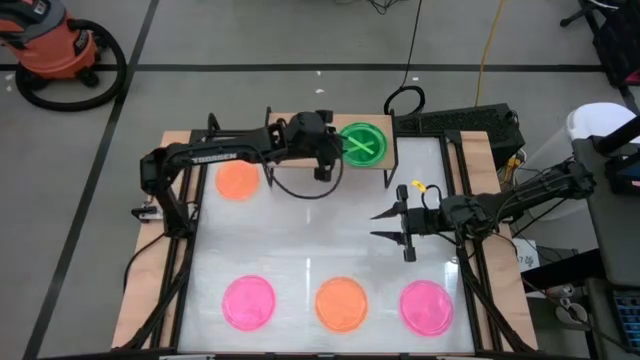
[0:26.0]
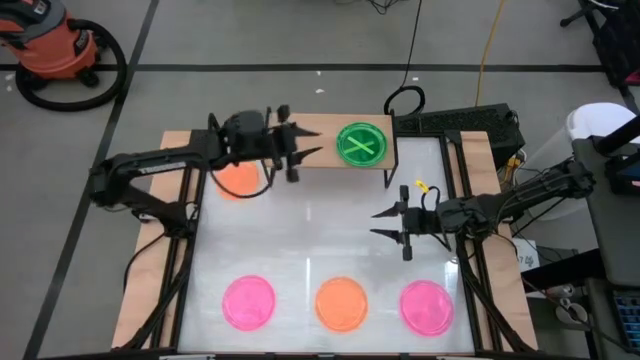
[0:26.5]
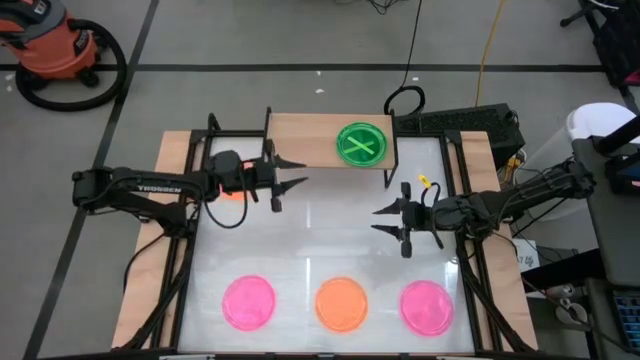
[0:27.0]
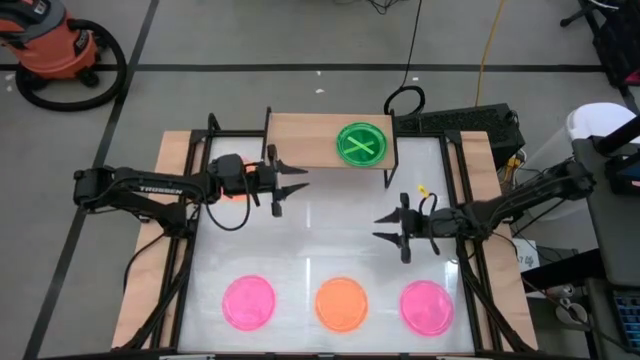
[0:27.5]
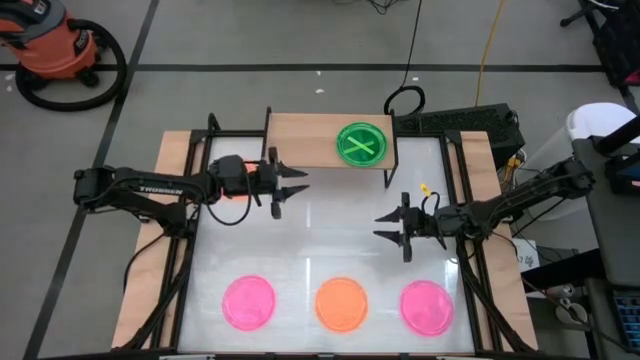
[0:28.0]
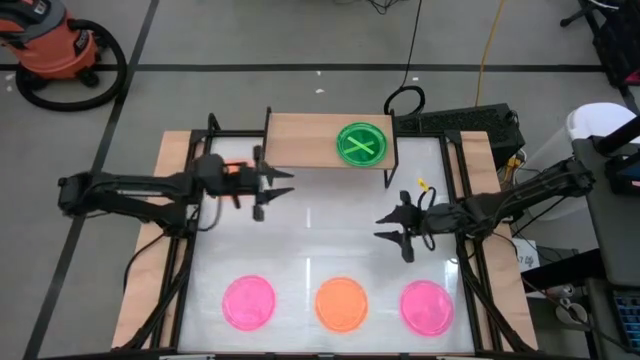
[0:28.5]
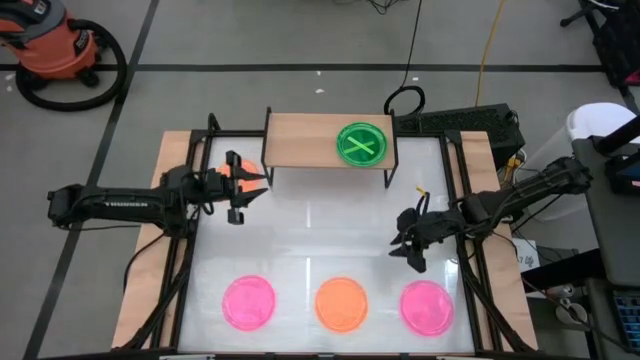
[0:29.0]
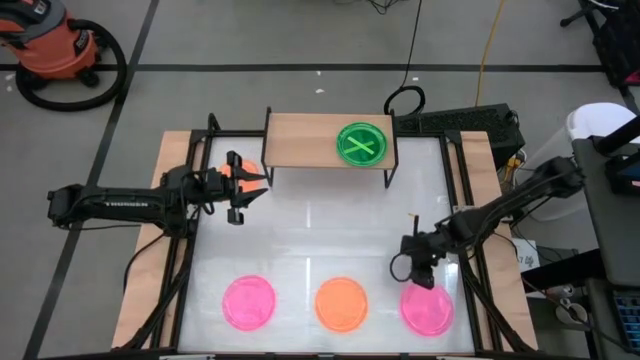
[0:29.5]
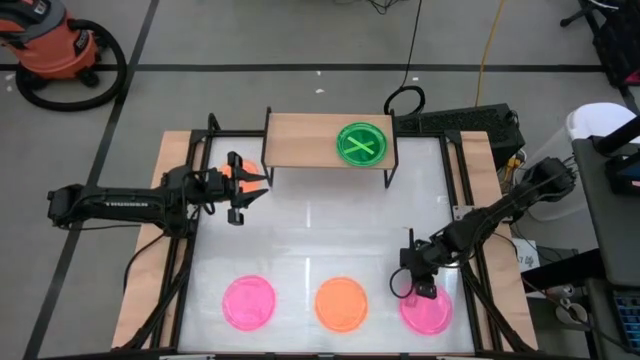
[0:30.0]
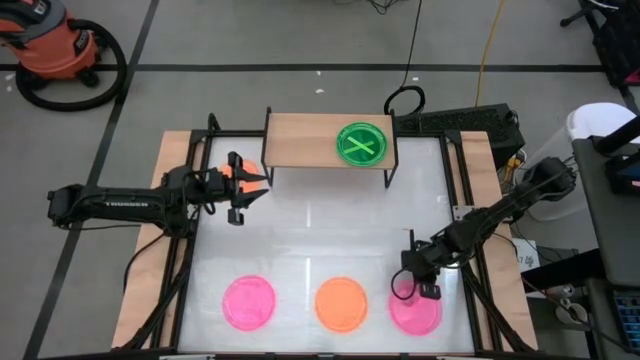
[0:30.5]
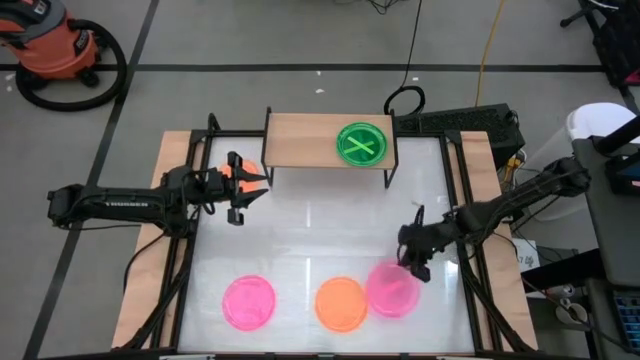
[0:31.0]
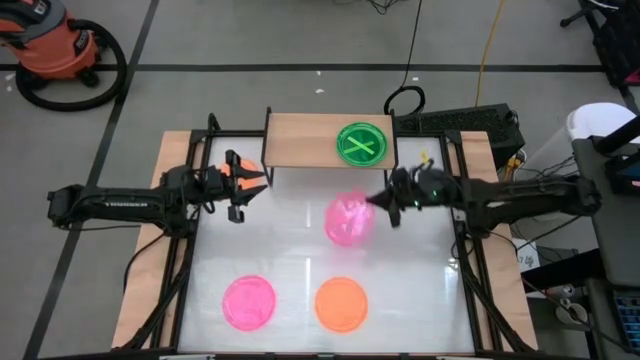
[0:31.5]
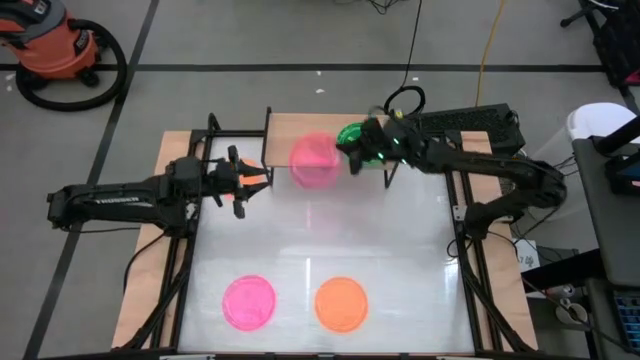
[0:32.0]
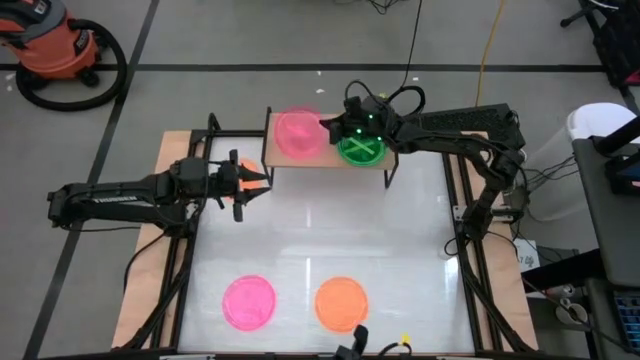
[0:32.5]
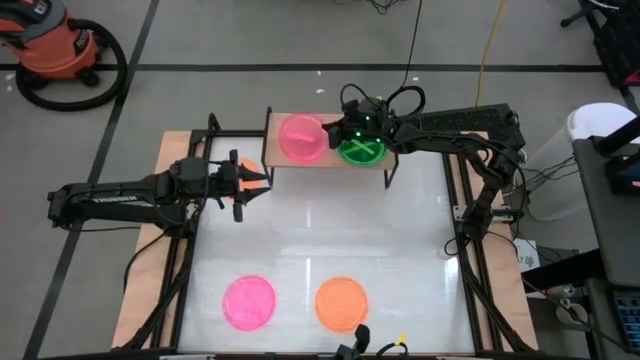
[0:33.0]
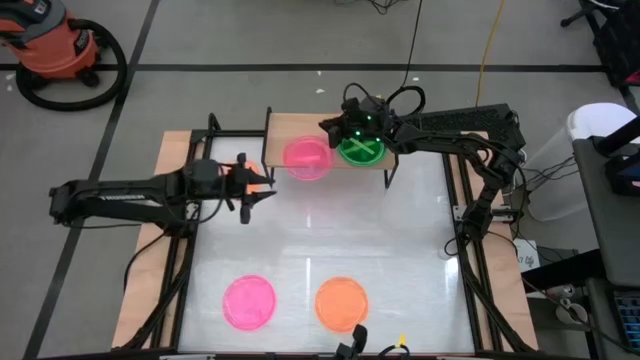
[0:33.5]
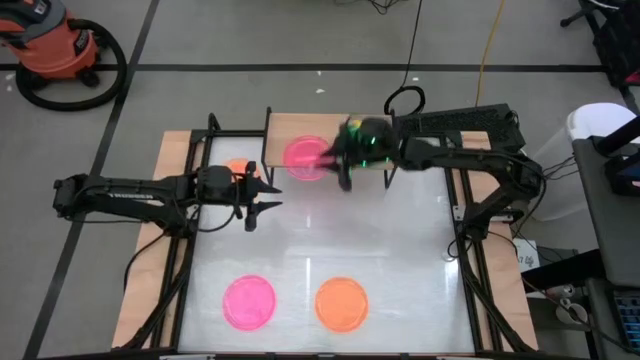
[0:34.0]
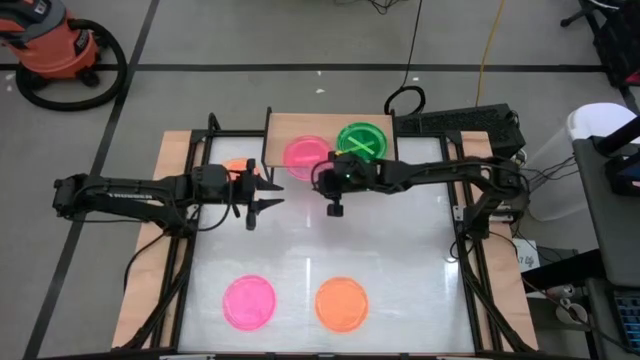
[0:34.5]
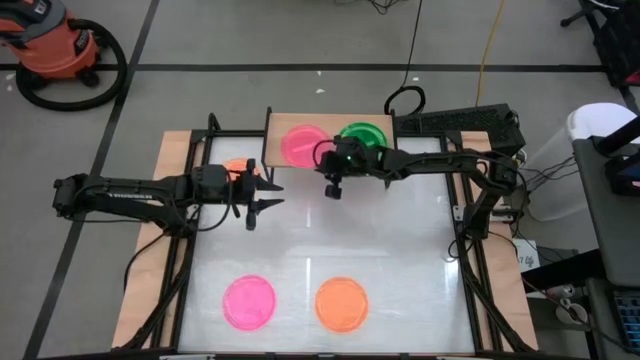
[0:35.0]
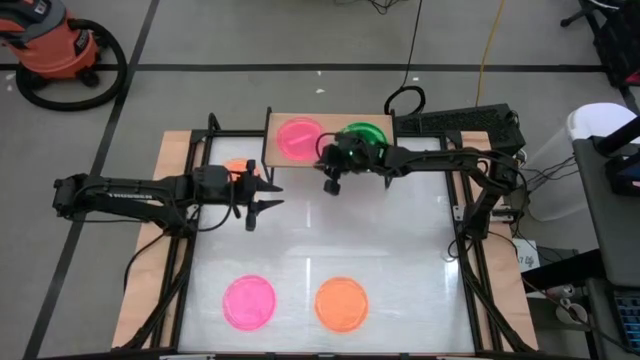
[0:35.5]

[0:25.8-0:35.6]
Task: Place and stack plates onto a shelf
Put the right pink plate on the shelf

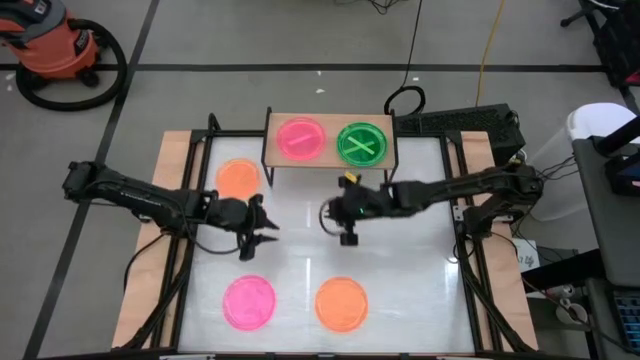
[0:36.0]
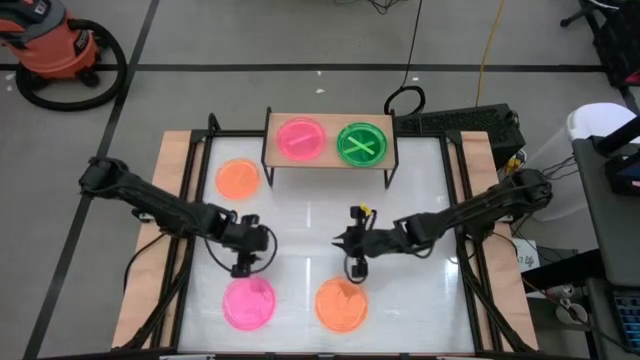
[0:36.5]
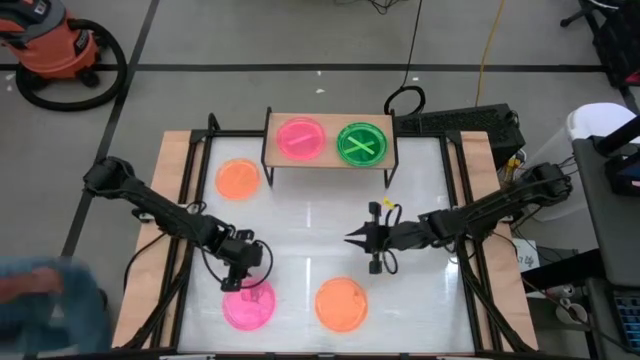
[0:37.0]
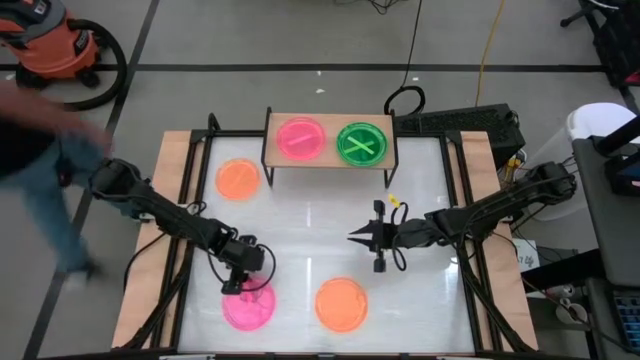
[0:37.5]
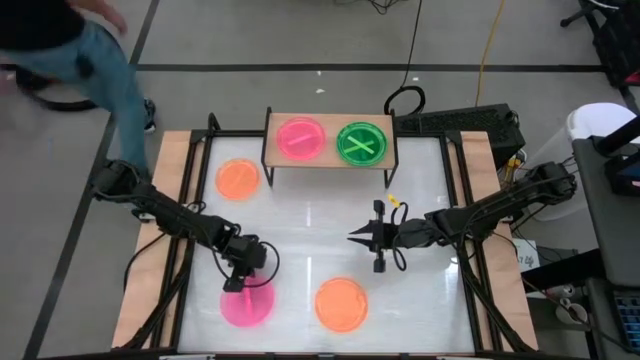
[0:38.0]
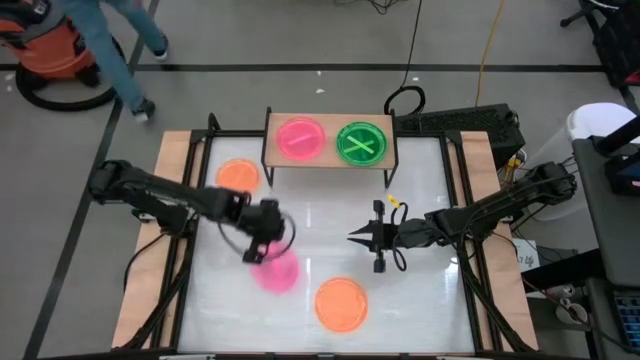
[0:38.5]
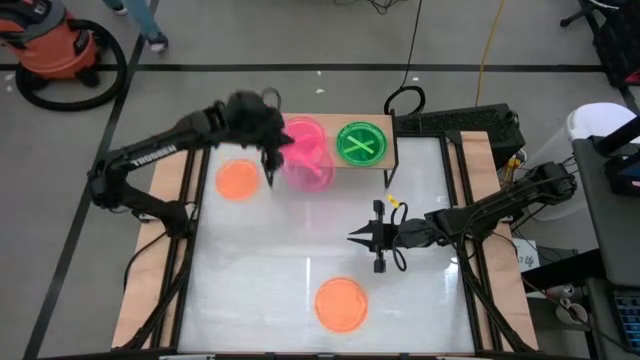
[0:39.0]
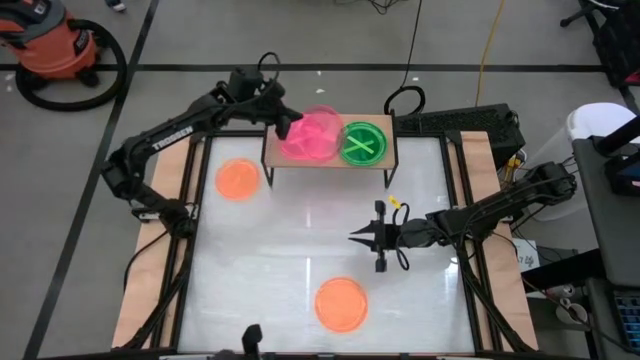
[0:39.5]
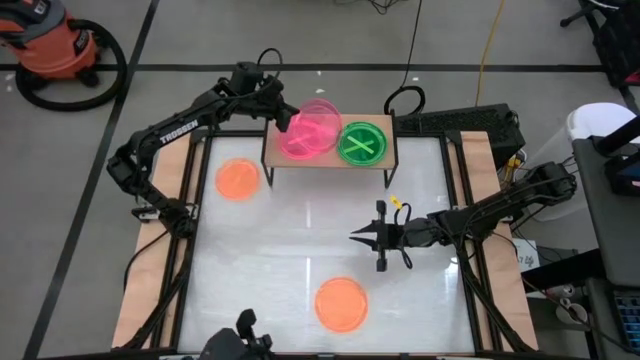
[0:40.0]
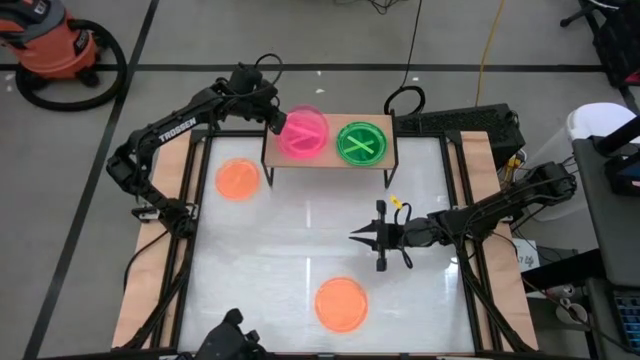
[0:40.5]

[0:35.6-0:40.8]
Stack the pink plate on top of the pink plate on the shelf

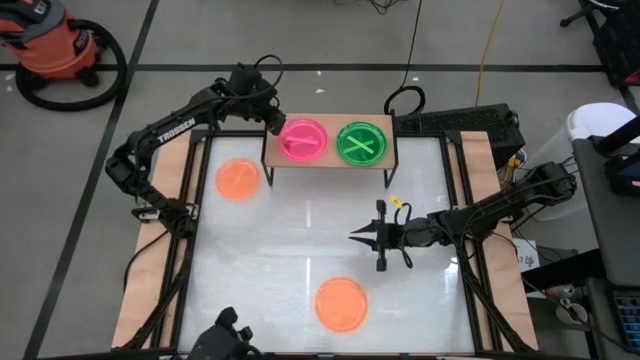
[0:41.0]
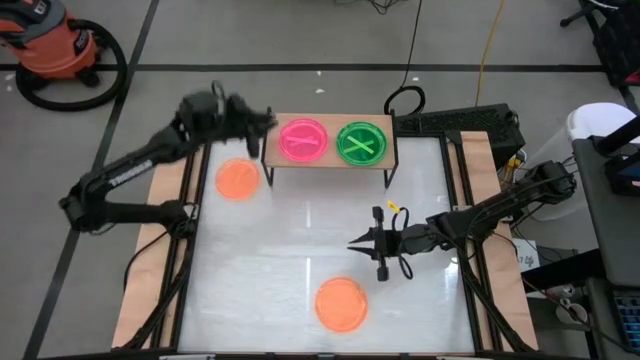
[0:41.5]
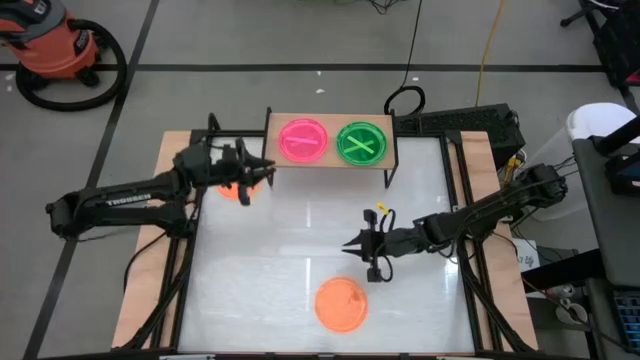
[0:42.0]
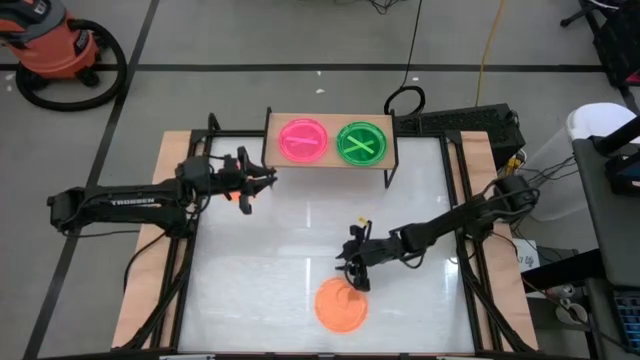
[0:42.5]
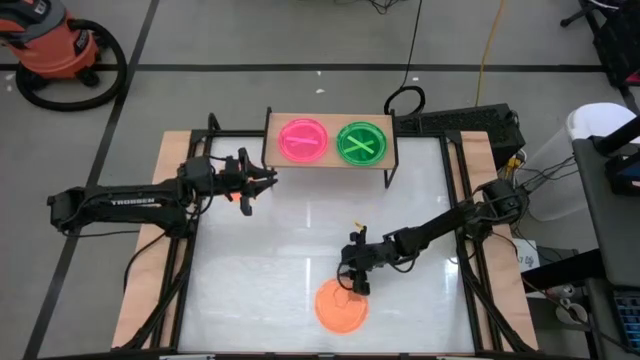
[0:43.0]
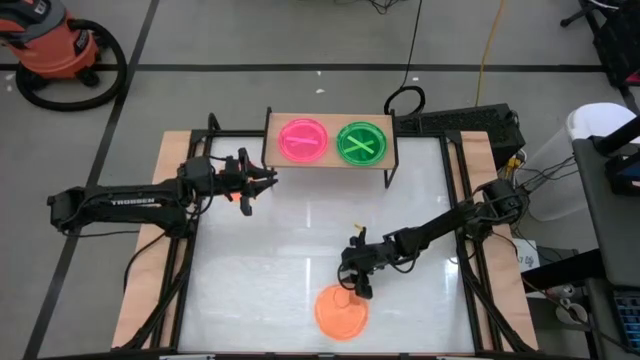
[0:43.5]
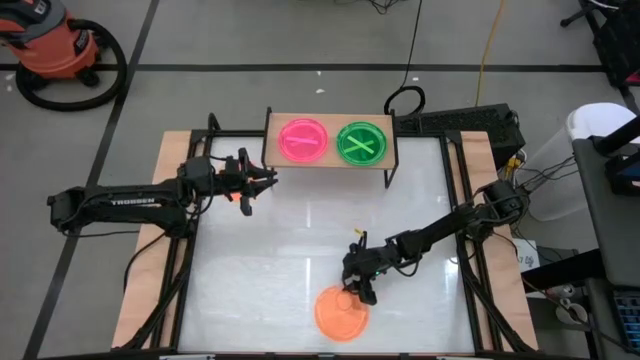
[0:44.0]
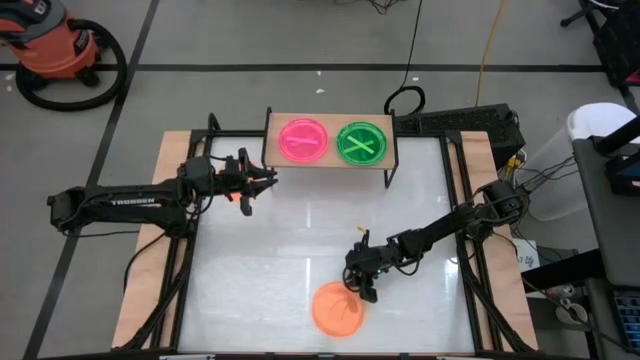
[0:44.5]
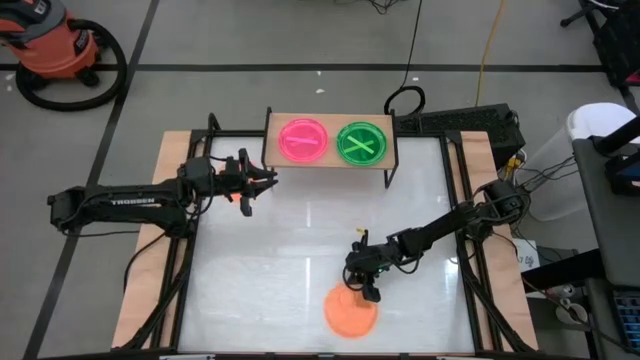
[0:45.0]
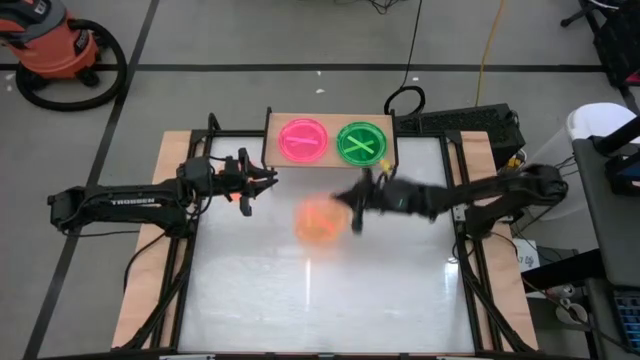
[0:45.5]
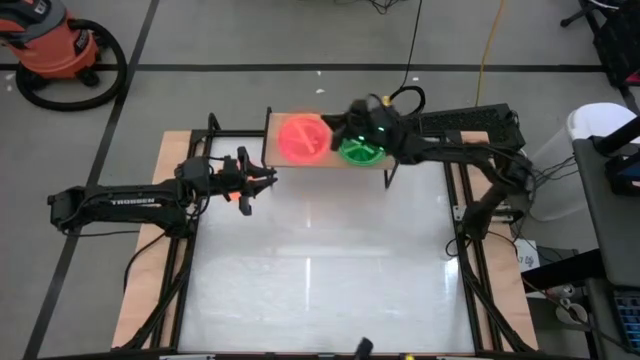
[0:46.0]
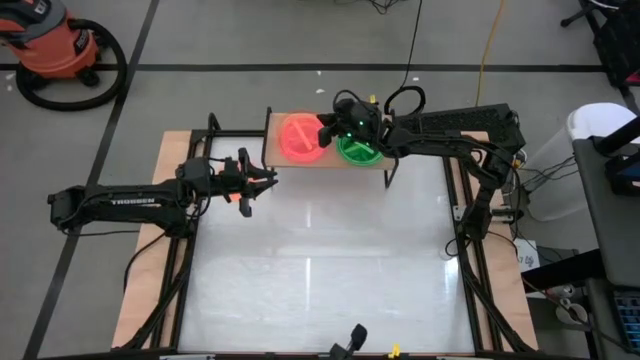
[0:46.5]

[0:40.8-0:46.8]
Stack the bottom orange plate on top of the pink plate on the shelf

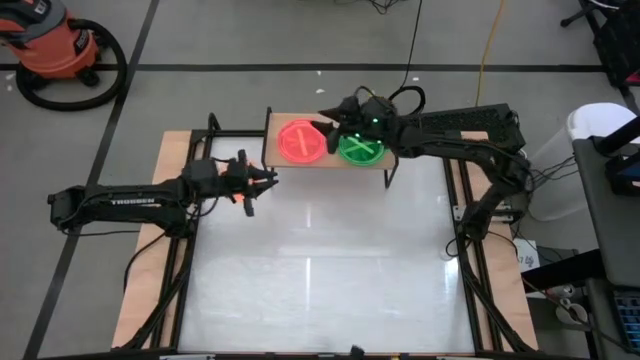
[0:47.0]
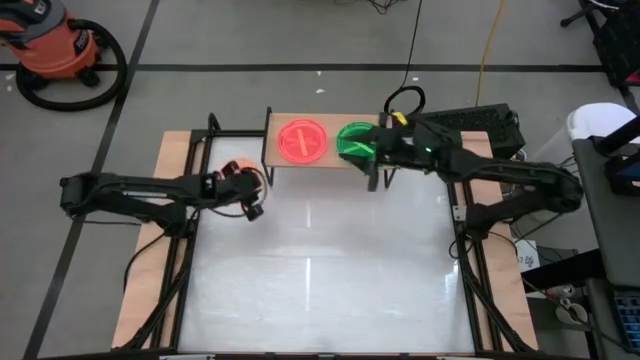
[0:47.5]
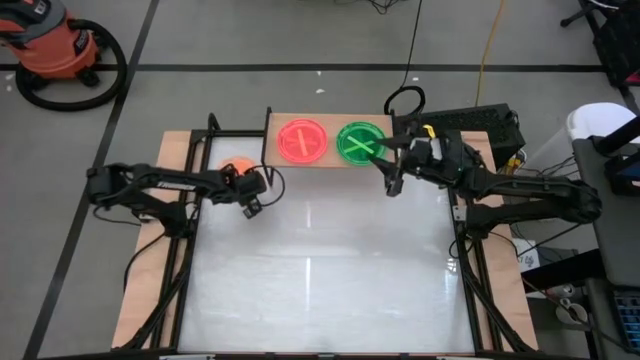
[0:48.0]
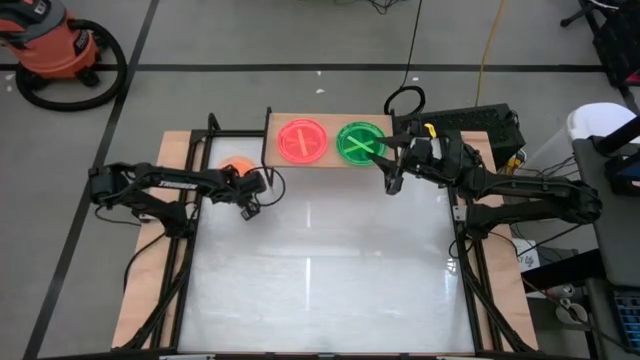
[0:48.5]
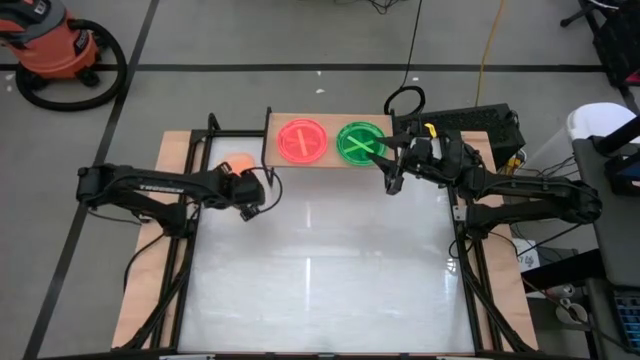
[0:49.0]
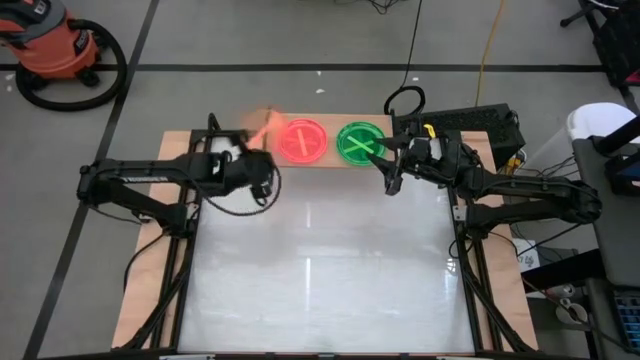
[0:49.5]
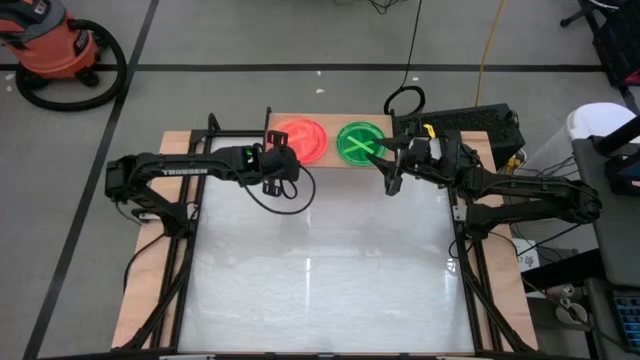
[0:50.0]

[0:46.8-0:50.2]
Stack the orange plate on top of the orange plate on the shelf
